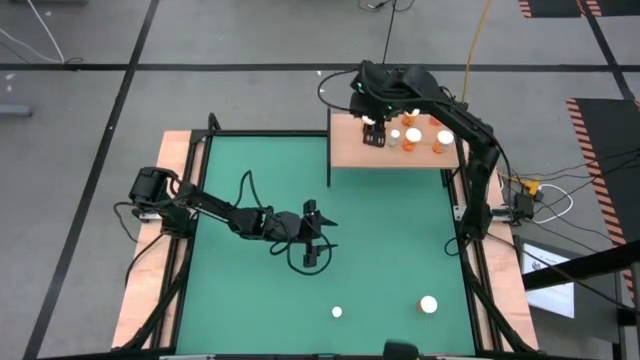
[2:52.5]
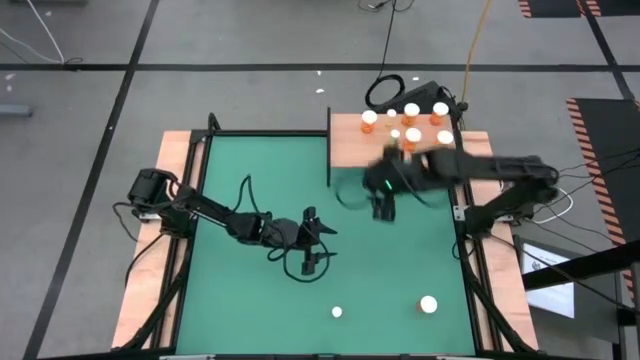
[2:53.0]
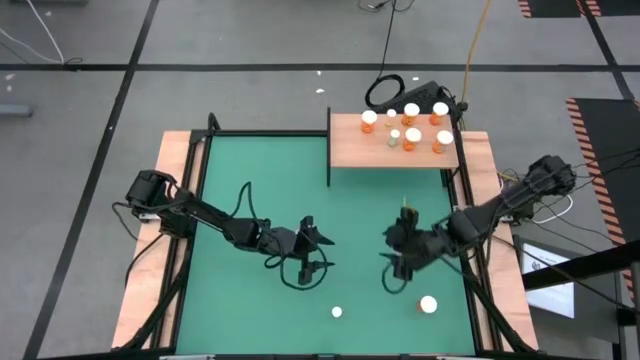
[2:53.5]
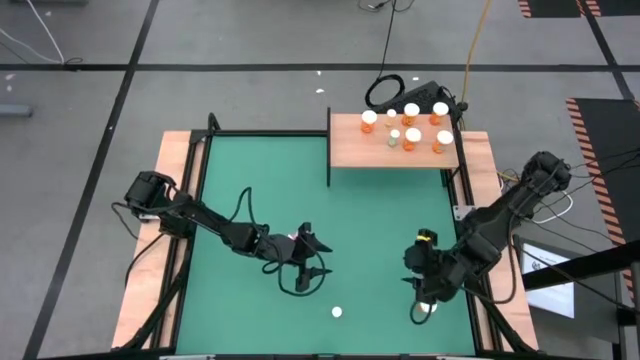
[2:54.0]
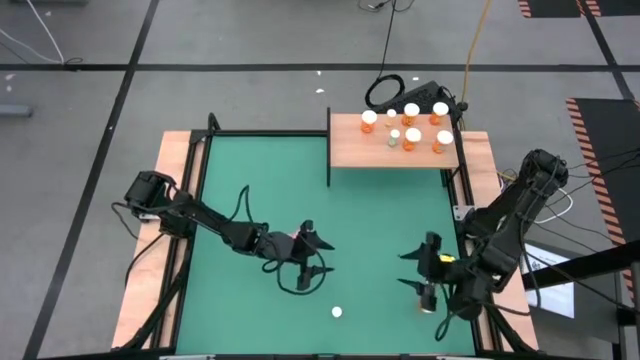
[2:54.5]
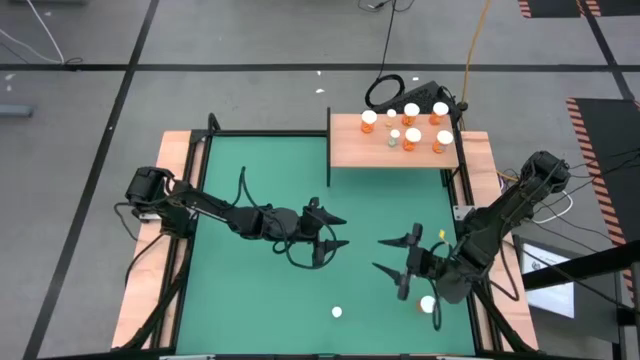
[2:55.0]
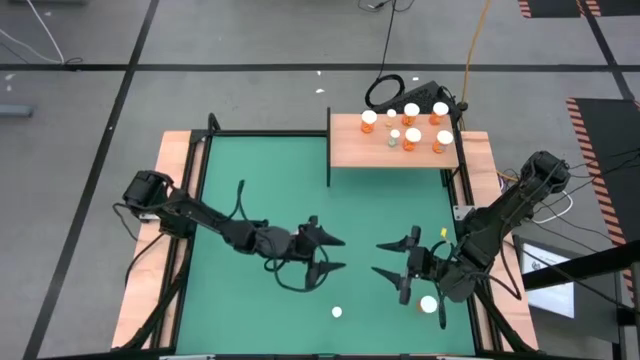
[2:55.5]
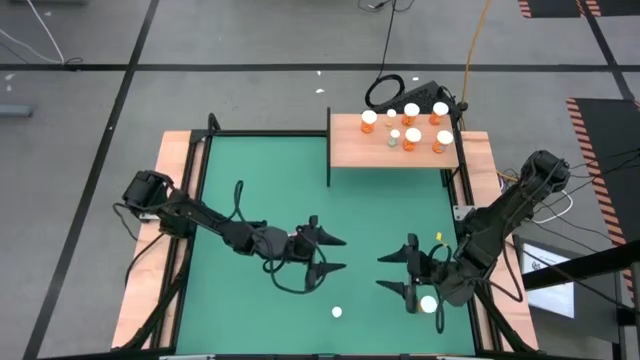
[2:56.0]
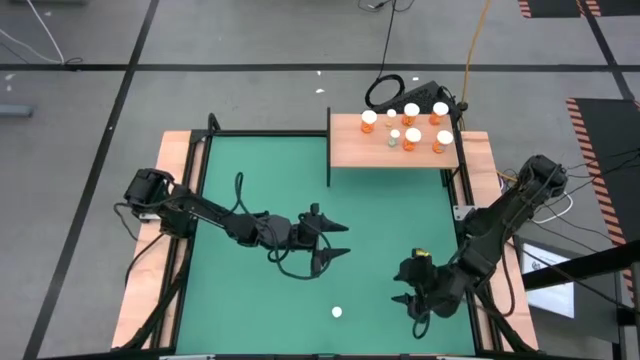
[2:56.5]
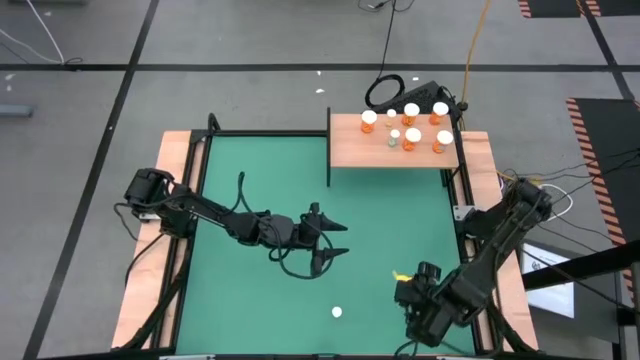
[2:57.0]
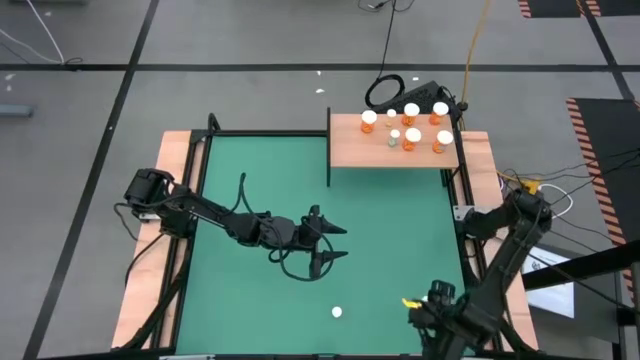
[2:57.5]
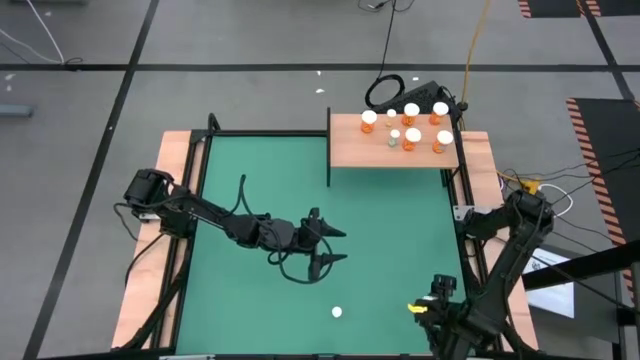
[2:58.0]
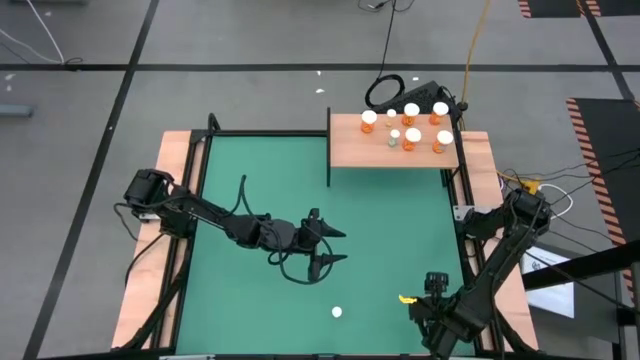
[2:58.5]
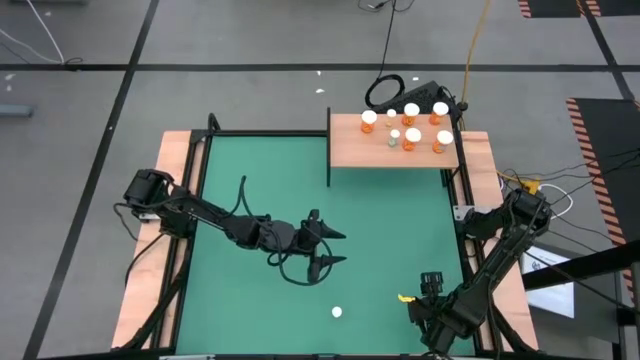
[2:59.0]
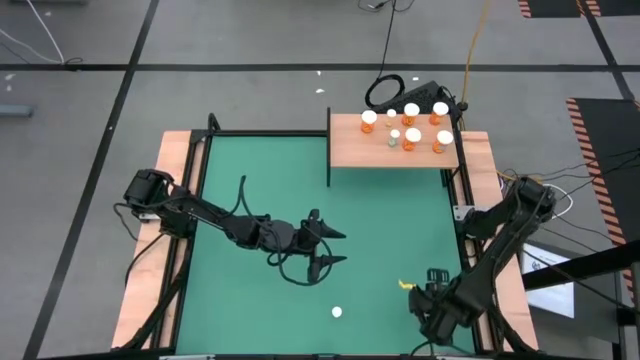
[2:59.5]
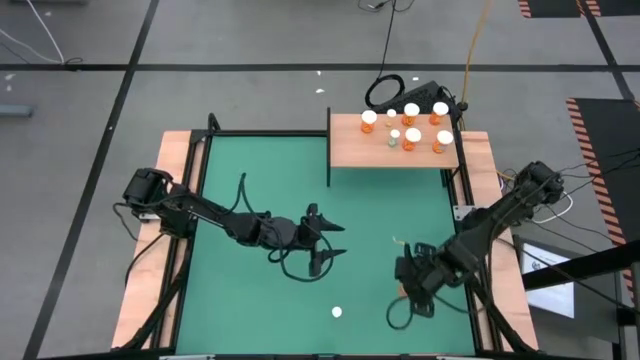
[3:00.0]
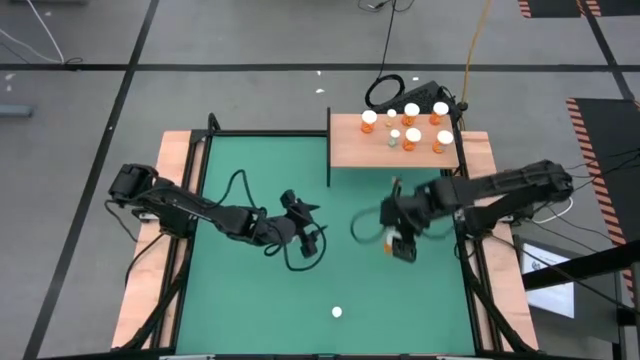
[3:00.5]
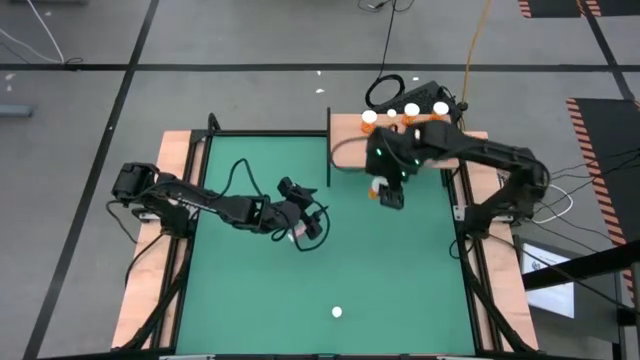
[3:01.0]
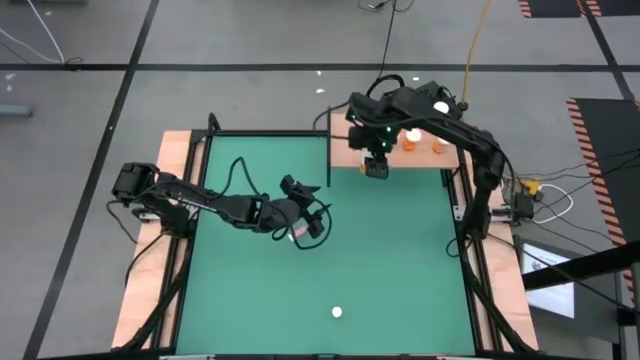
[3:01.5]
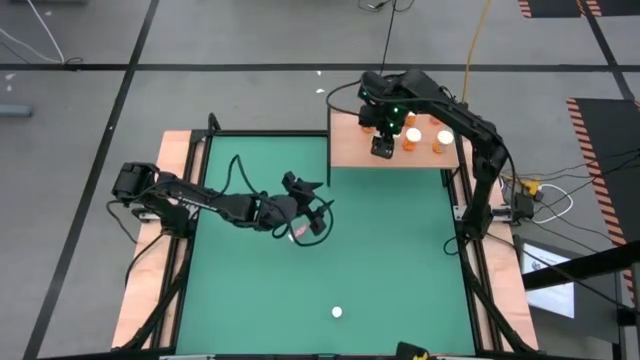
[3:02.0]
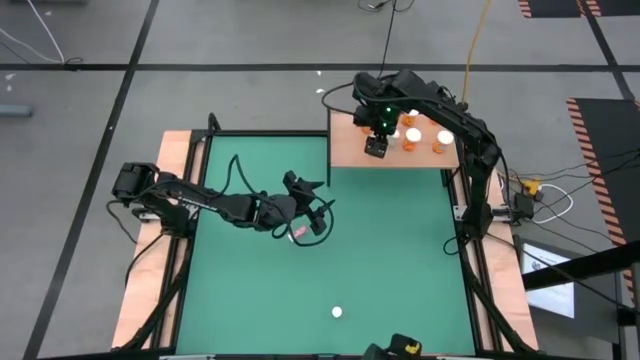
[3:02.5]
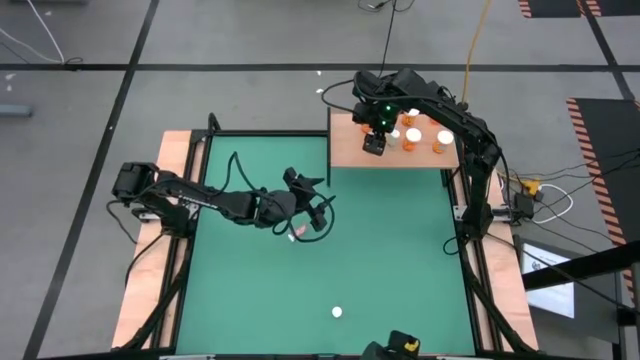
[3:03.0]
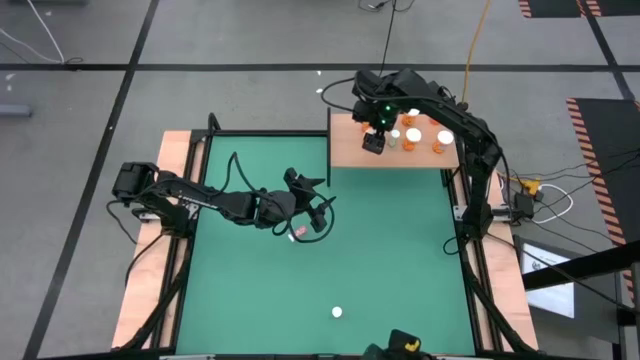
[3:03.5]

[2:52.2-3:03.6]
Task: Pick and place medicine bottles onto shelf by color
Put the orange pill bottle on the shelf

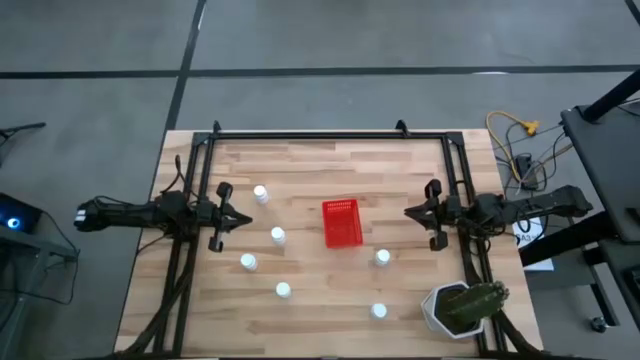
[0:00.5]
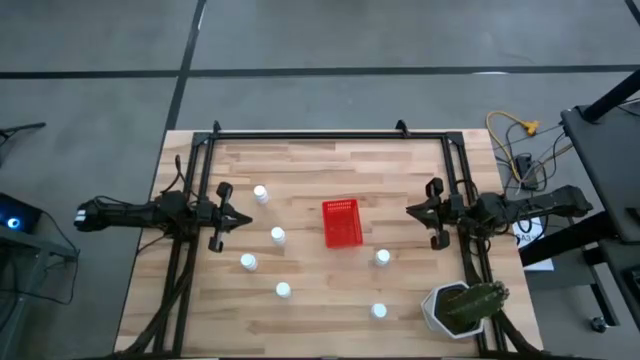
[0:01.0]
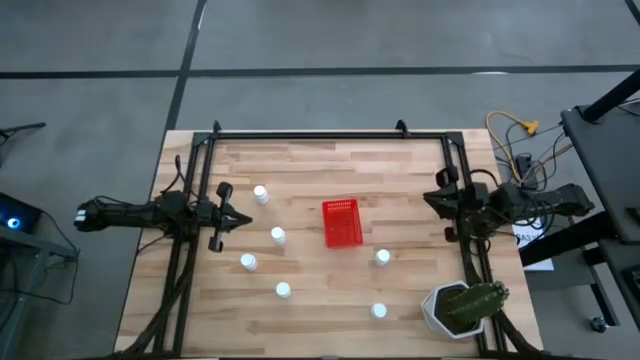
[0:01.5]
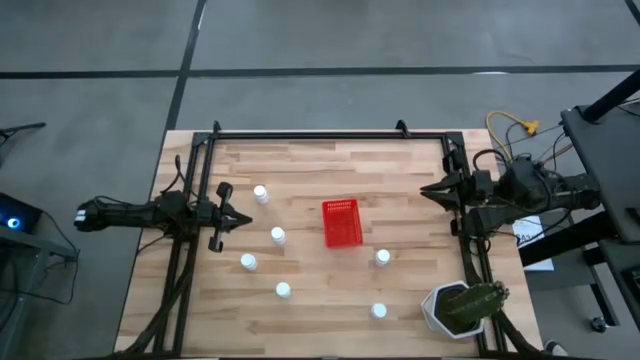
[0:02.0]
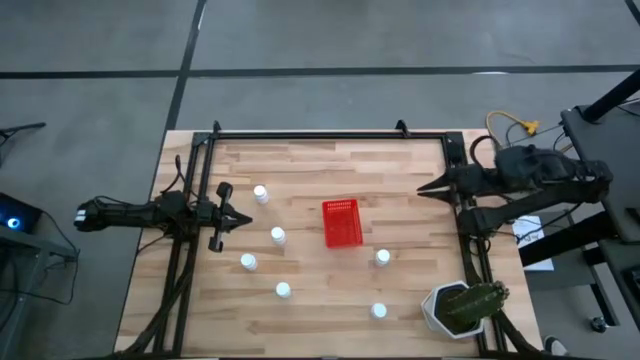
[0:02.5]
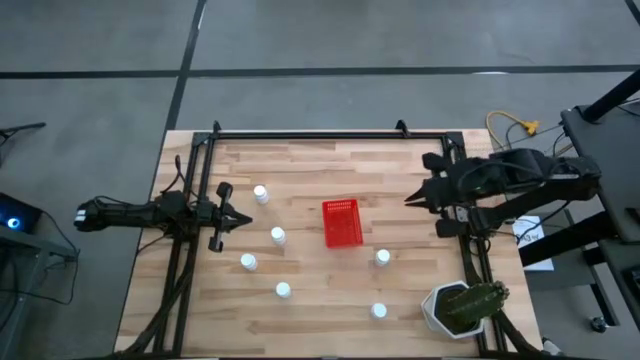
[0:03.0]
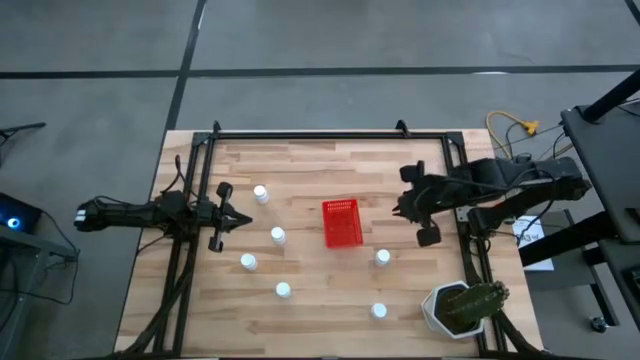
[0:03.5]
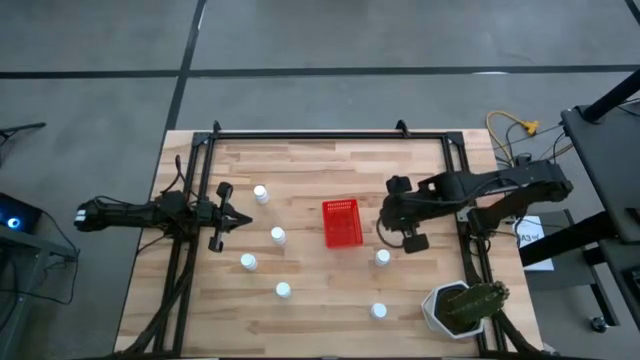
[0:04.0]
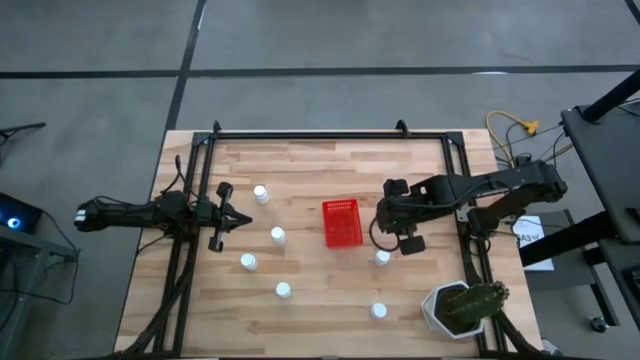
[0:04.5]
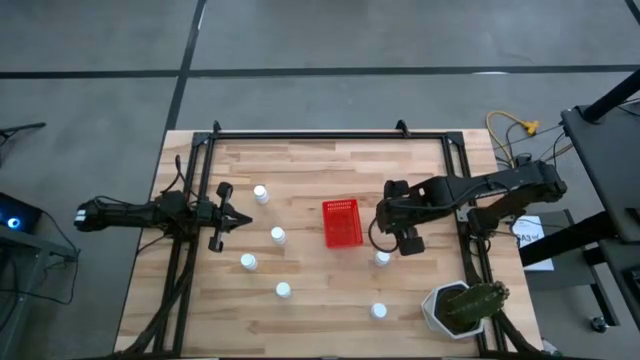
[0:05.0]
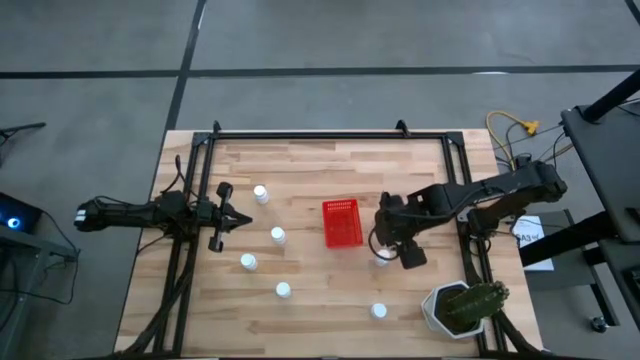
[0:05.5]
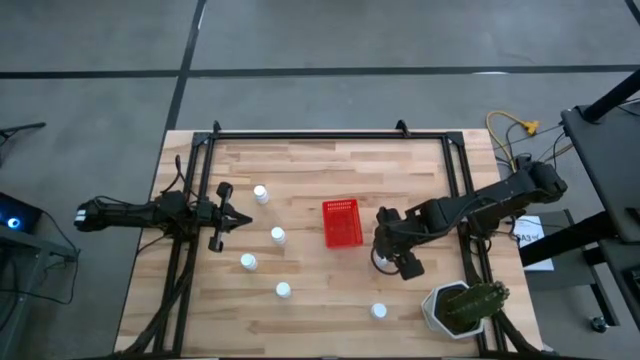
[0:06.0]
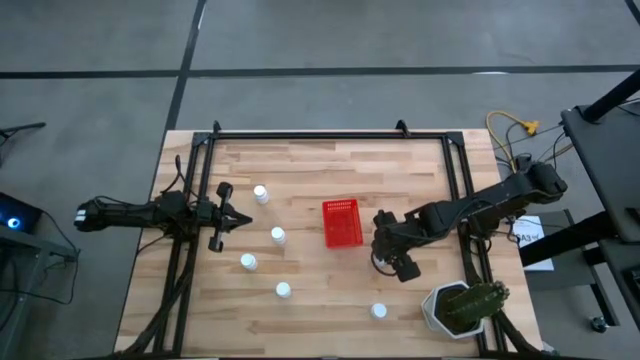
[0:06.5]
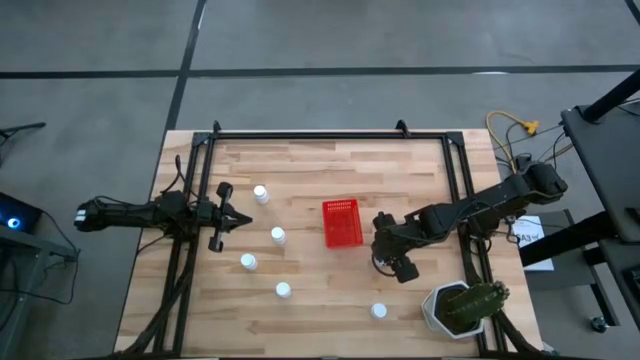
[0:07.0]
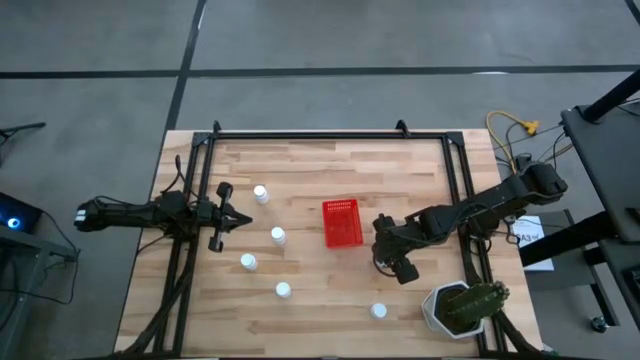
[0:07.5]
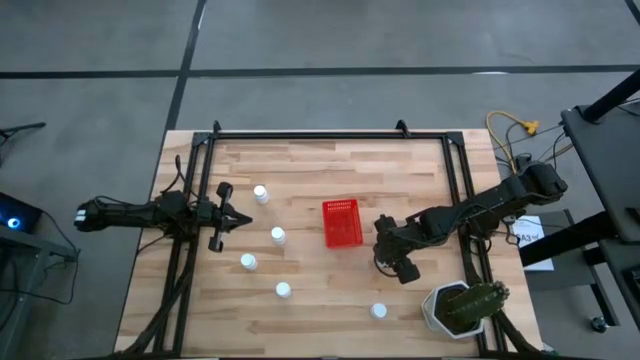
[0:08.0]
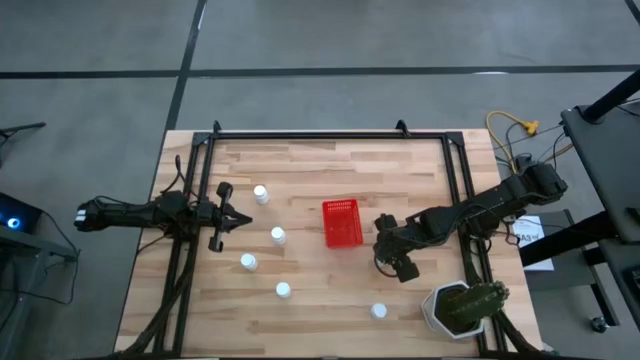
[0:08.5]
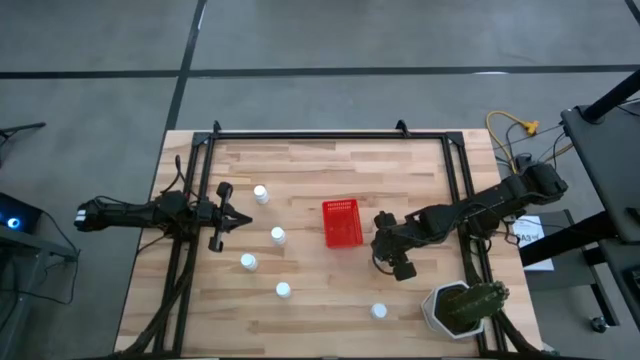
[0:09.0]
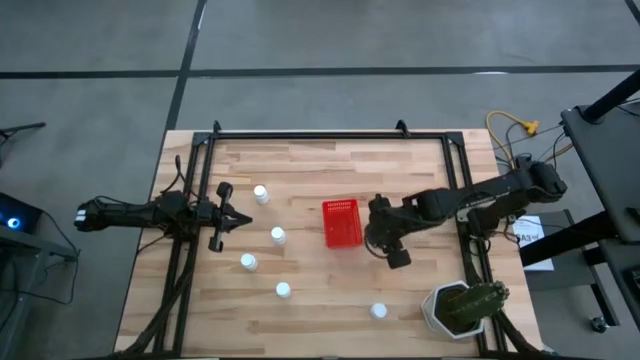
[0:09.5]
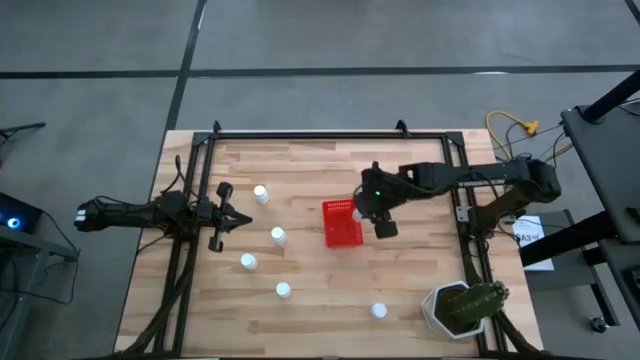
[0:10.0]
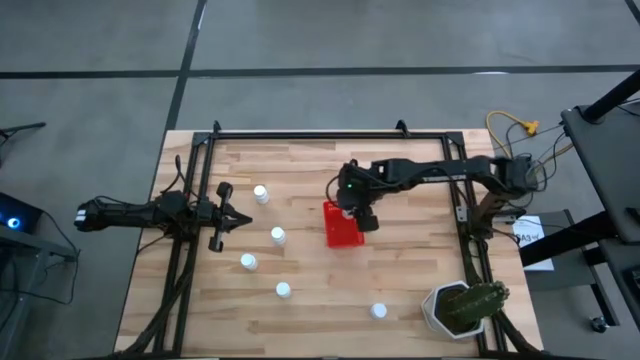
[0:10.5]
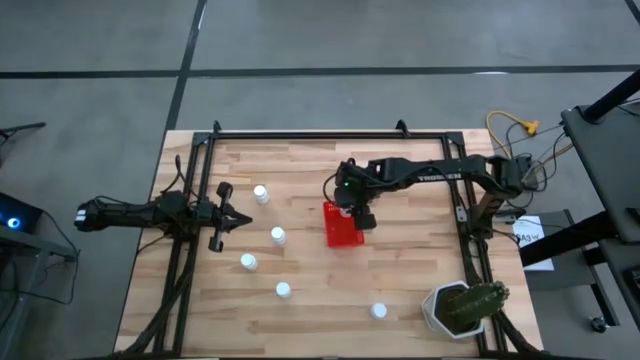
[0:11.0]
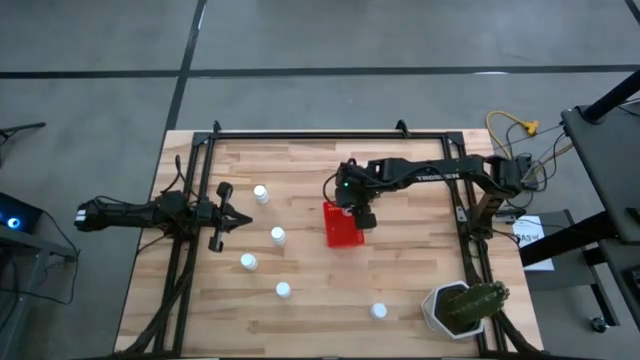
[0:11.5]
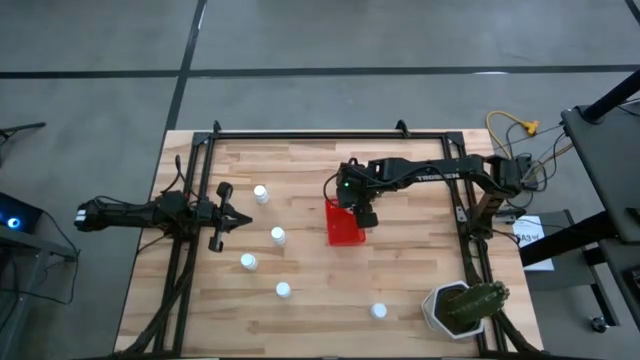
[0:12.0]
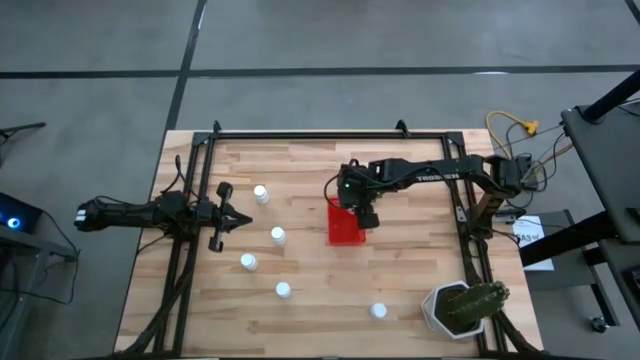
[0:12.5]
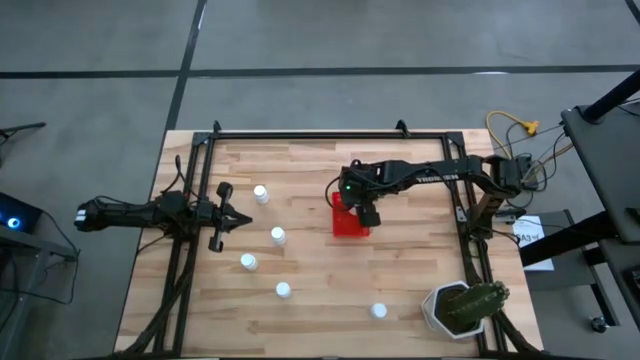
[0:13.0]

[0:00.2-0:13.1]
Task: Pick and place pill bottles into a basket
Put the middle right white medicine bottle into the red bin
